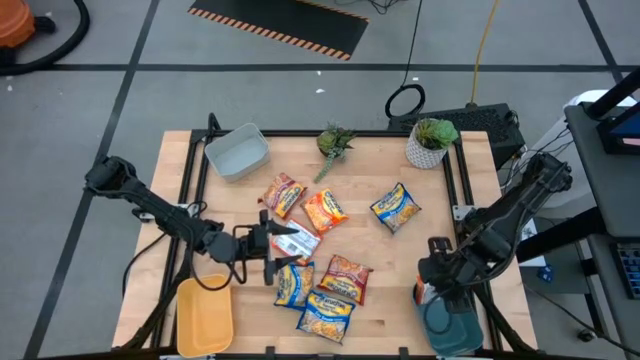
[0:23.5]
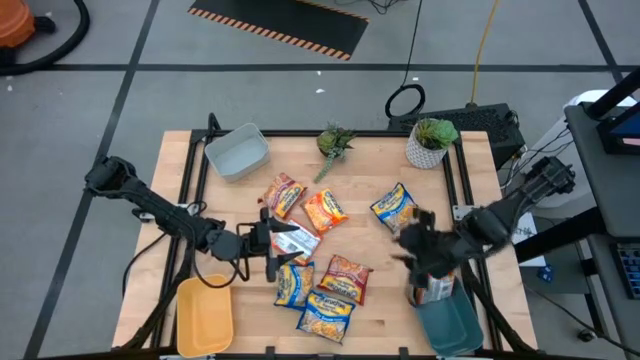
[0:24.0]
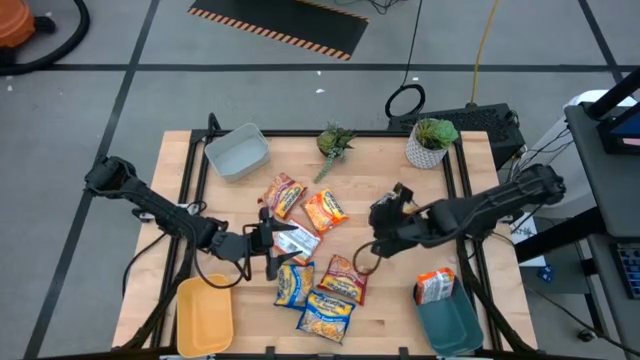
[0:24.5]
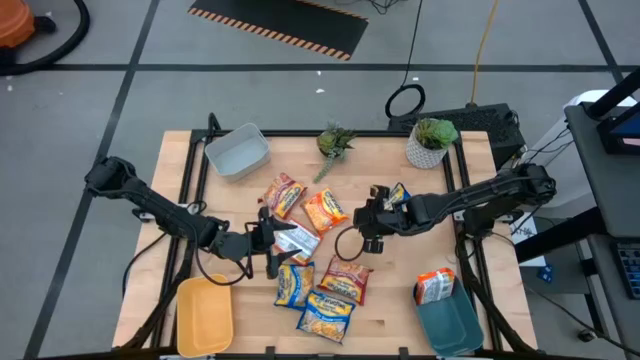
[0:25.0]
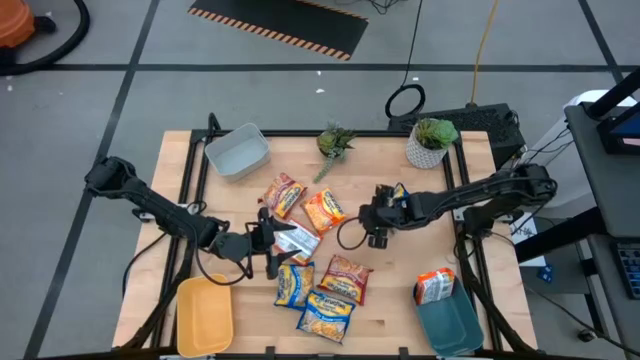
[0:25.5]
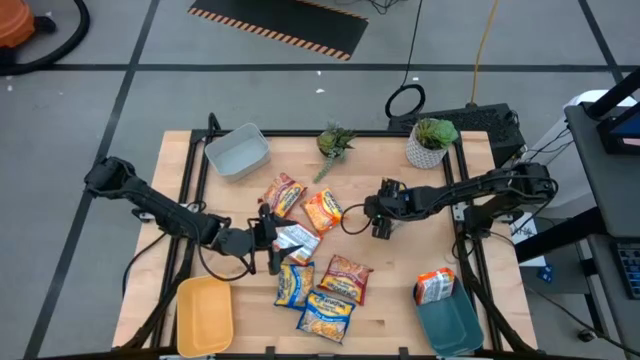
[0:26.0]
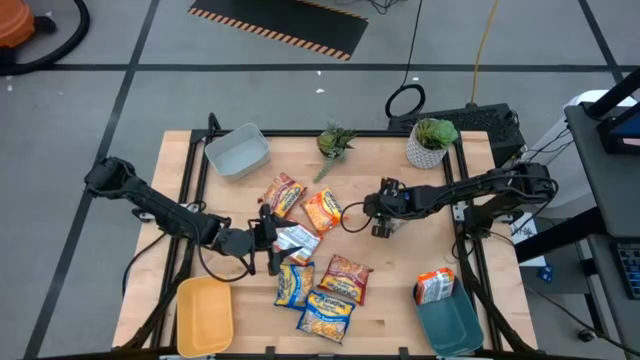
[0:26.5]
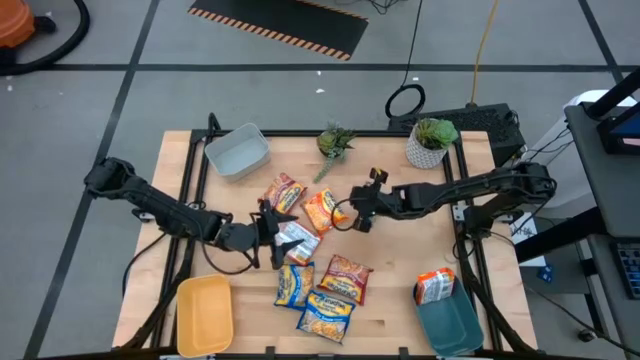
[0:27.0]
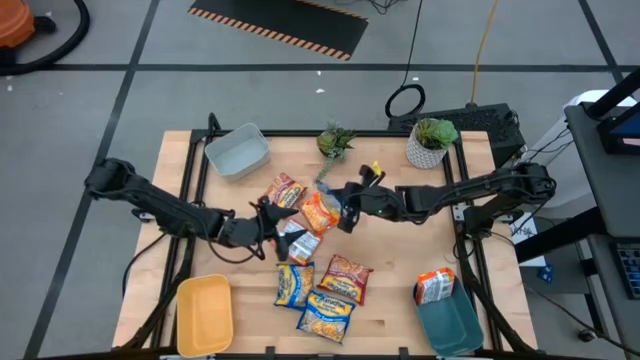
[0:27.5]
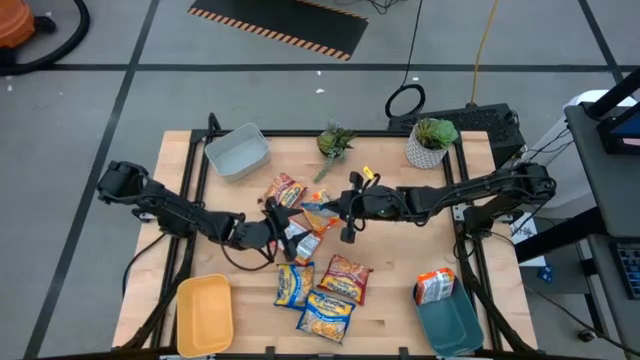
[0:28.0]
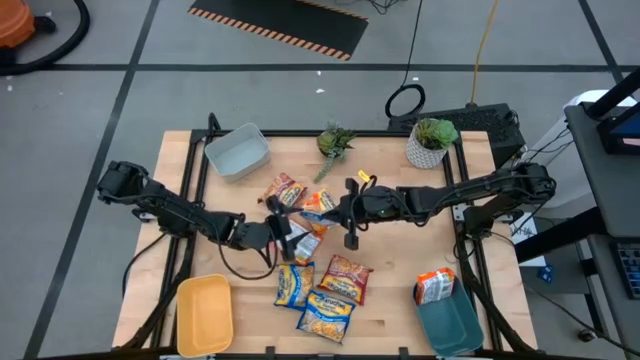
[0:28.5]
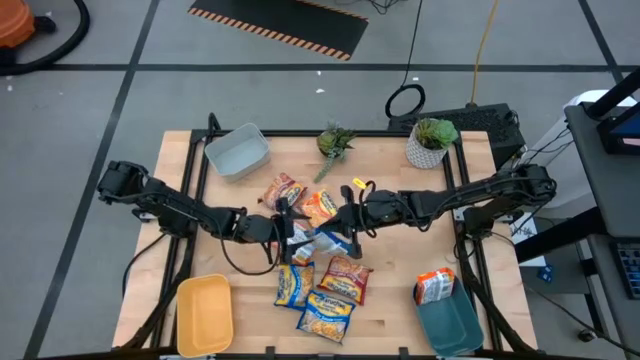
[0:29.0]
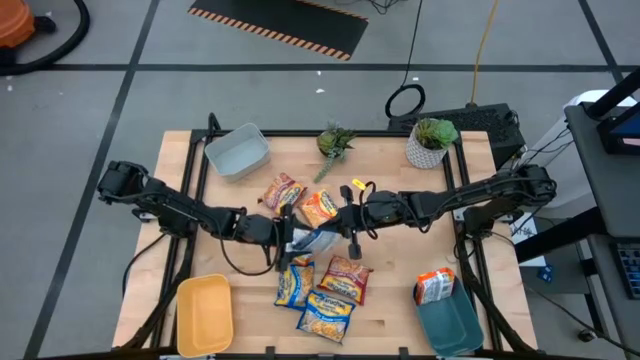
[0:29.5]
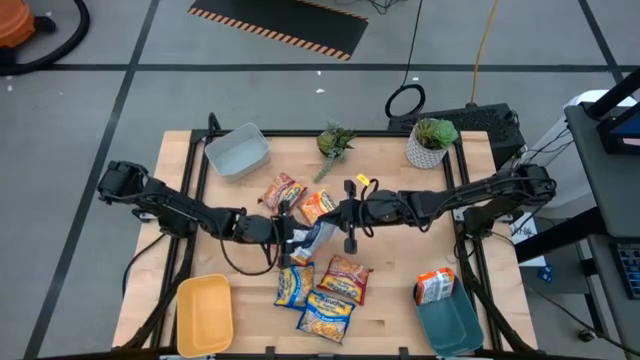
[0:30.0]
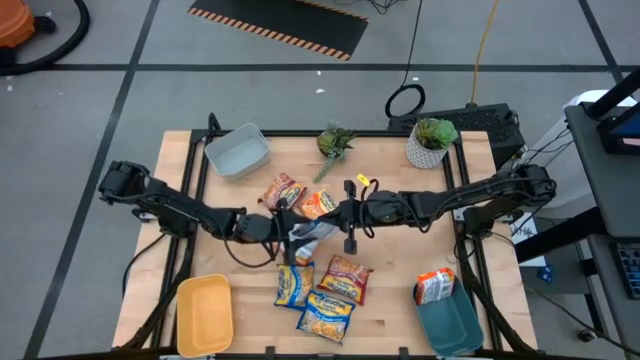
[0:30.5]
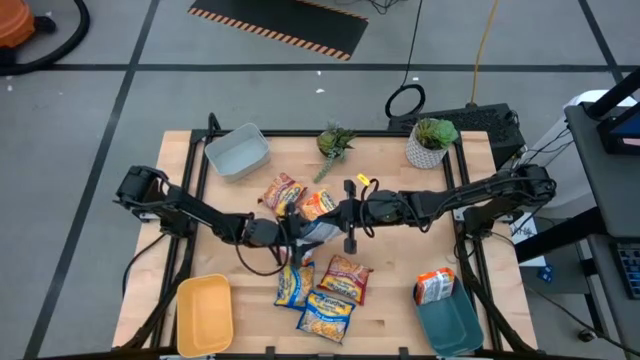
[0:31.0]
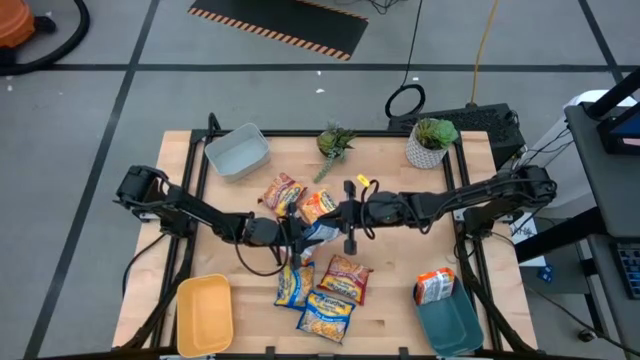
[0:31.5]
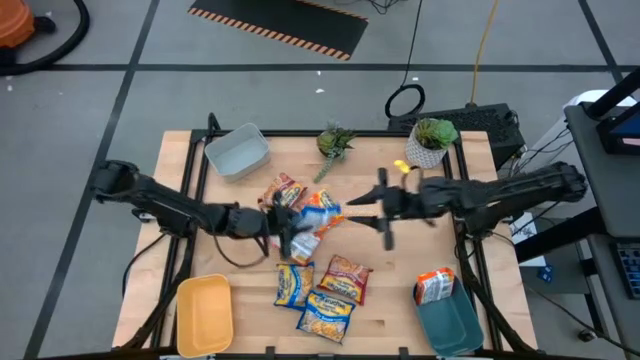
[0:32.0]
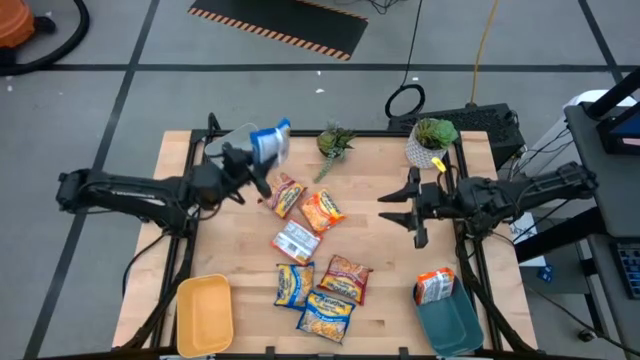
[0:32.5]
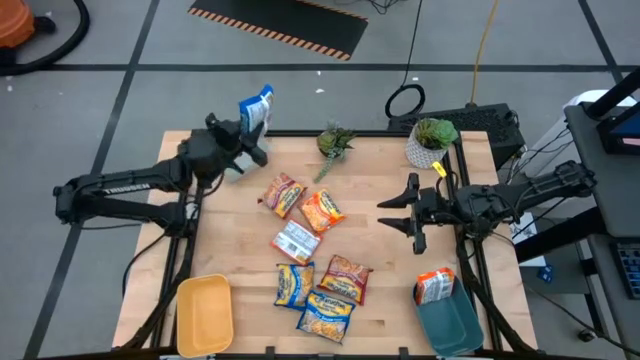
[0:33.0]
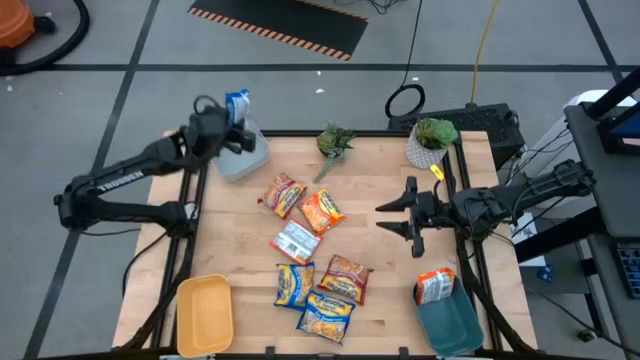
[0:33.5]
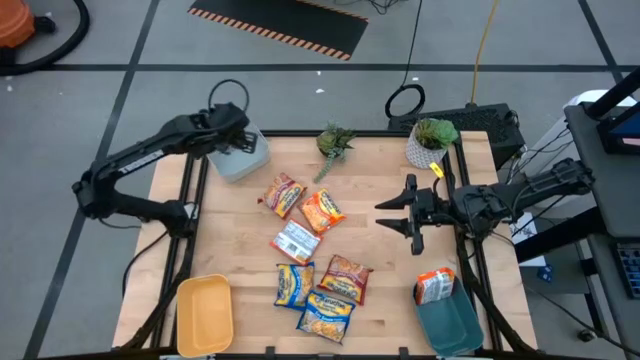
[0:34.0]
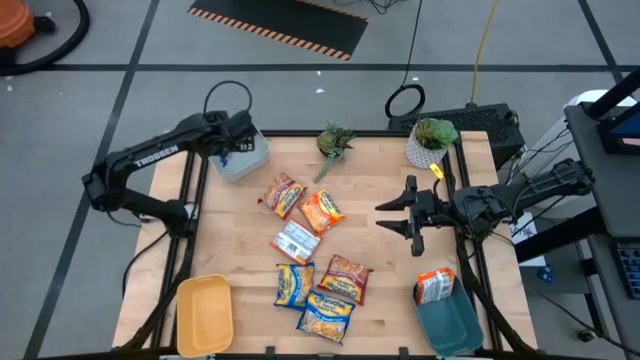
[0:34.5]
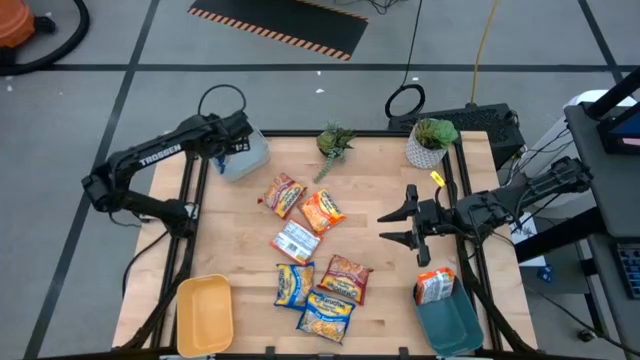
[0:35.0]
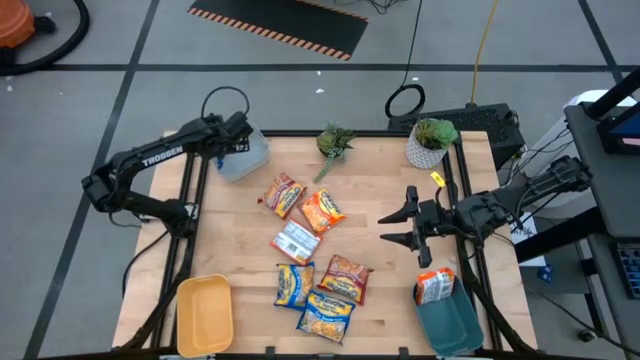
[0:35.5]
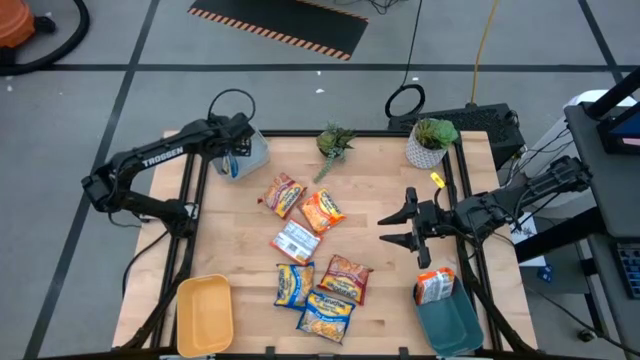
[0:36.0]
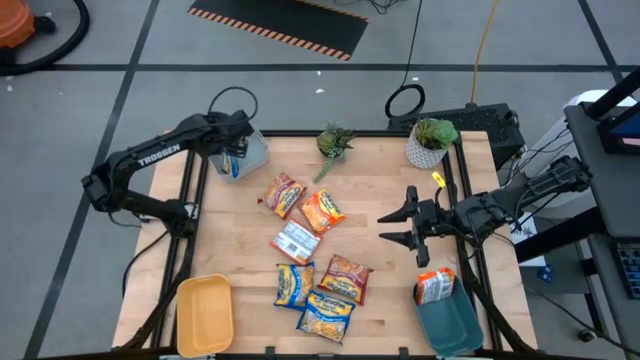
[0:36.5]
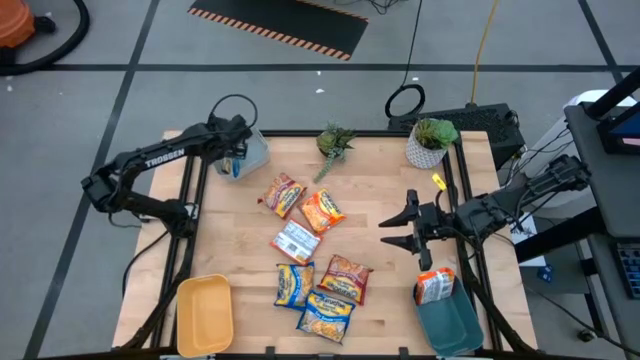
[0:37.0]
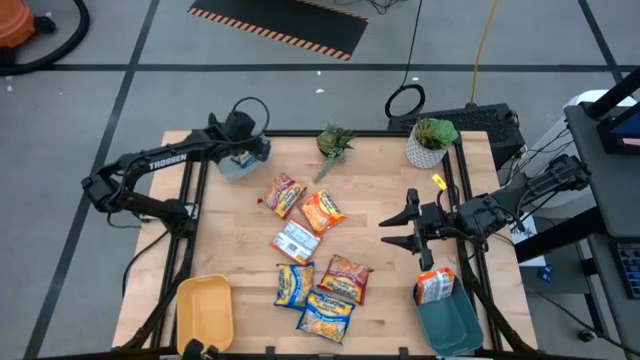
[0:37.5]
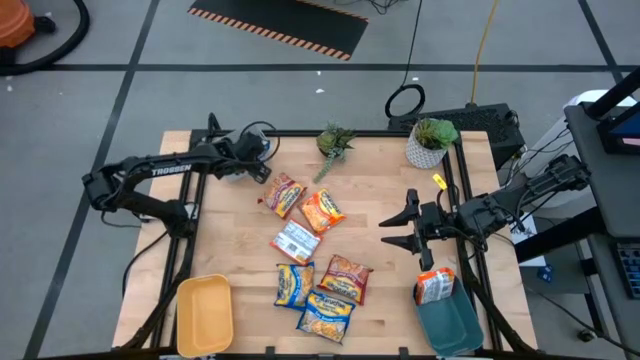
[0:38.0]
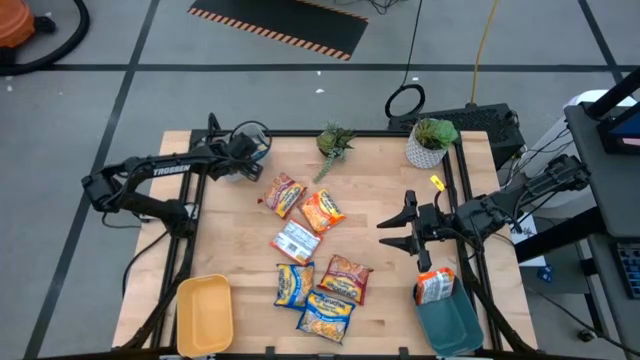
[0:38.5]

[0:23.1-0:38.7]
Task: Sort Maruchan noodles
Put the top blue noodle pack into the gray bin

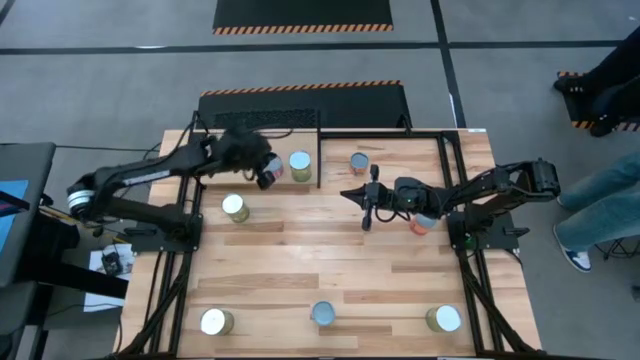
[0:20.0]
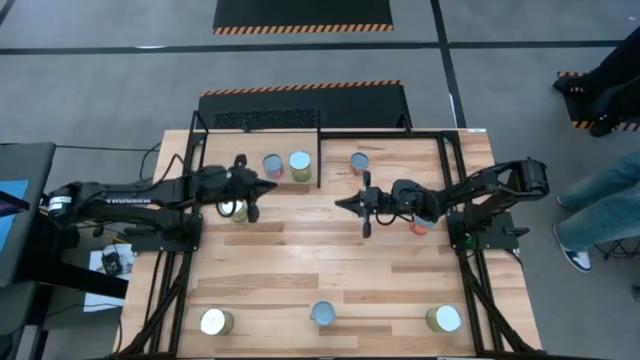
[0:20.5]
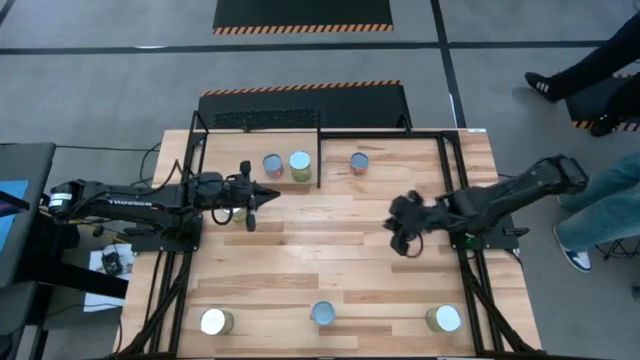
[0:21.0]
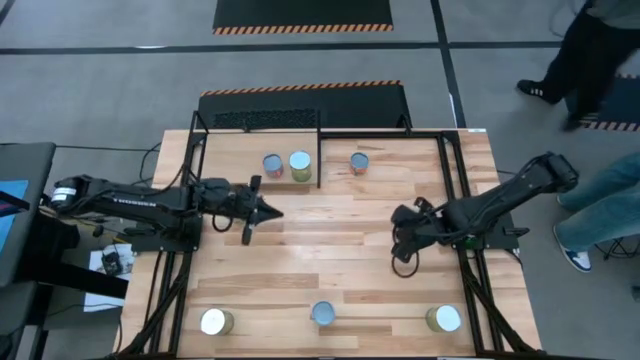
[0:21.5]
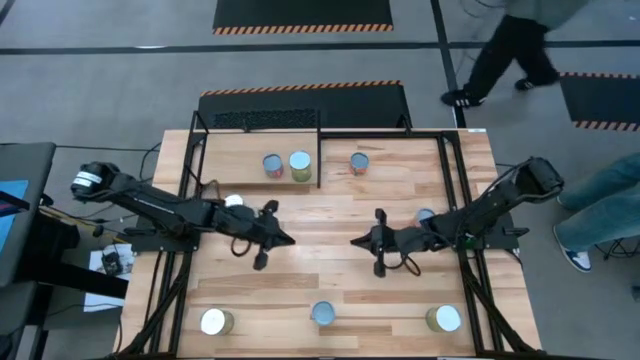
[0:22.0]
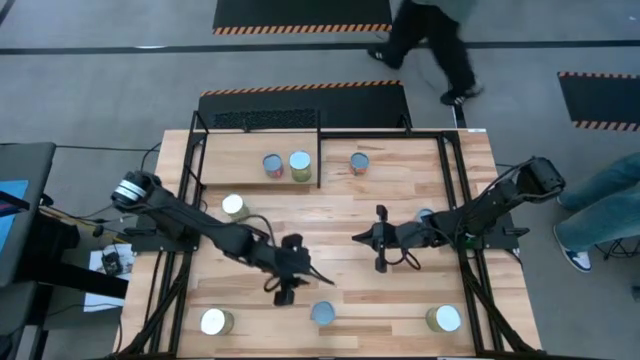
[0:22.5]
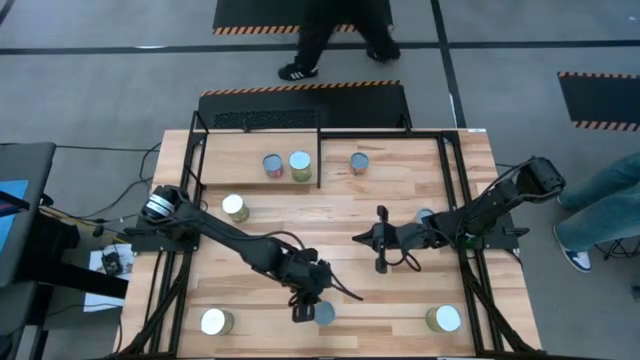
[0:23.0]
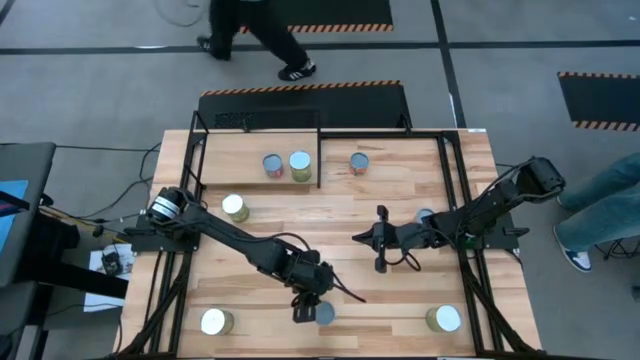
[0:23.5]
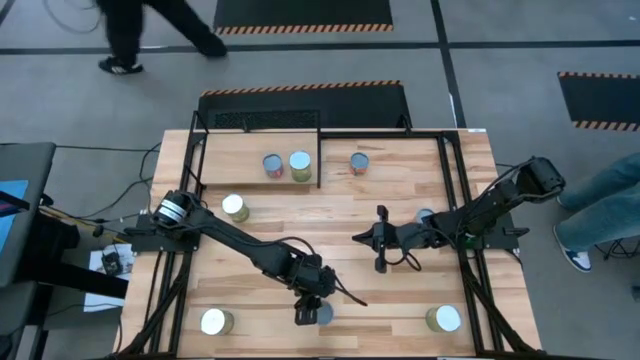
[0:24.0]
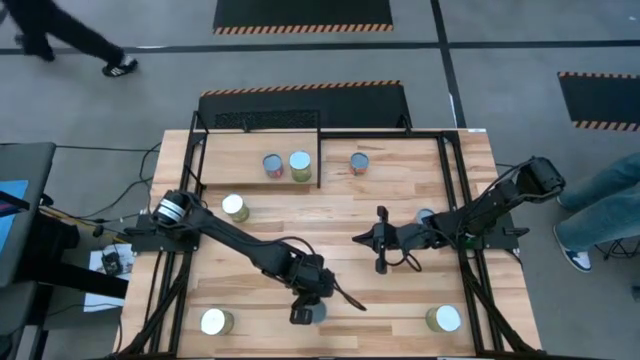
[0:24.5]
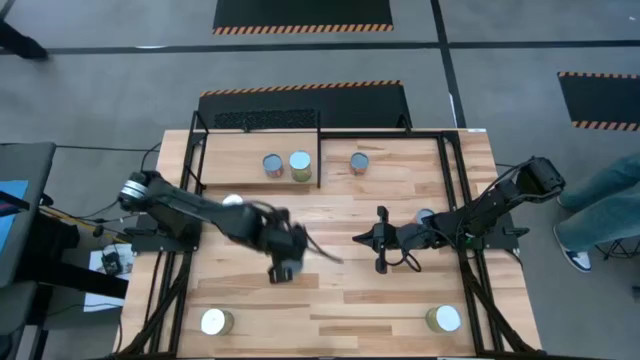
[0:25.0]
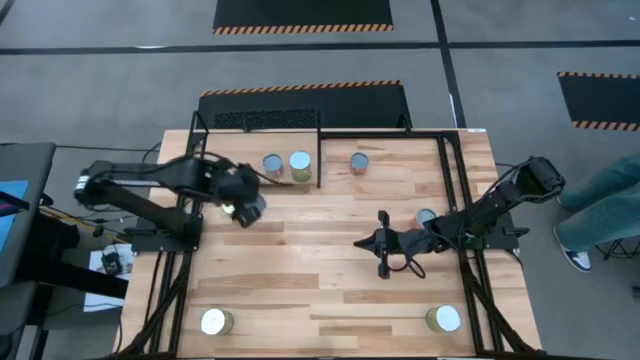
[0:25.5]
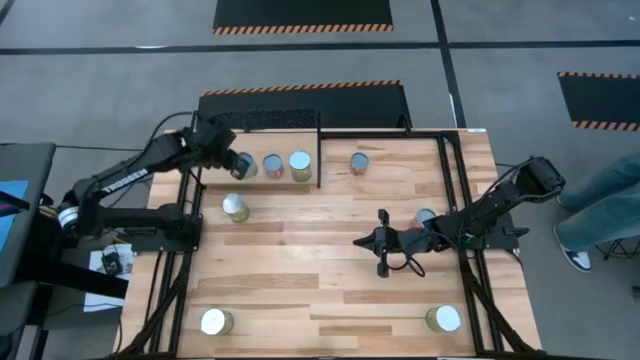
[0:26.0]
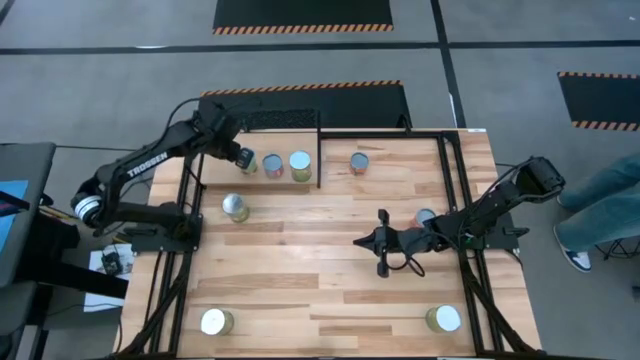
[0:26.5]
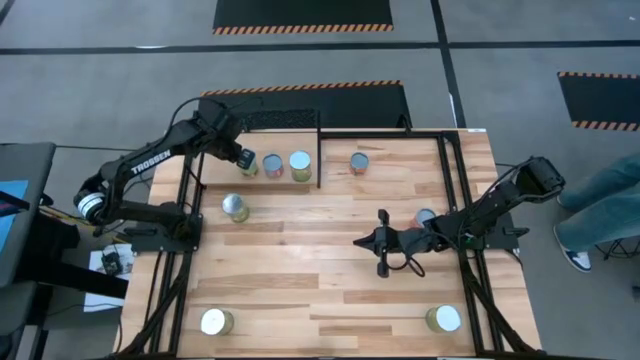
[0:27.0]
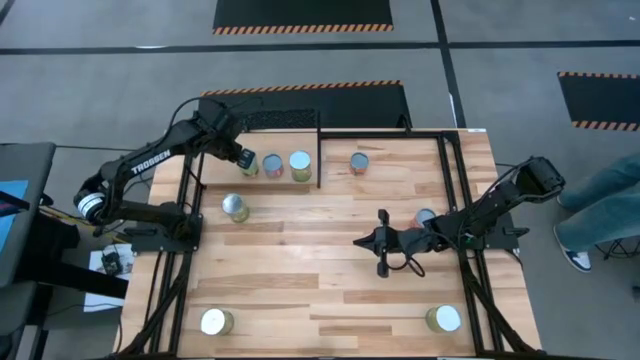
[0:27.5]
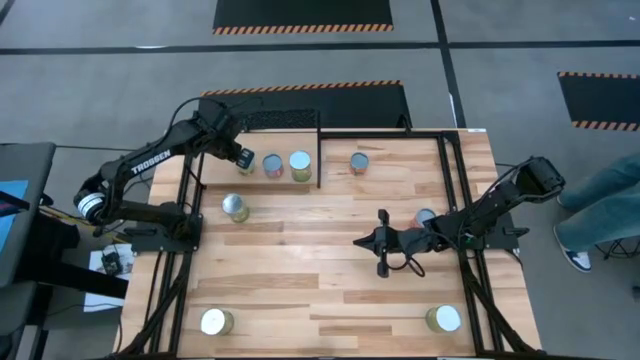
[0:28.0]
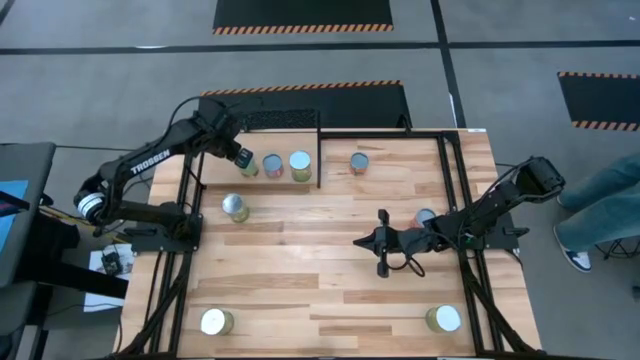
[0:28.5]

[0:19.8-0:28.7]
Task: Pick and place cans onto a shelf
Put the canned spaghetti sauce on the shelf
